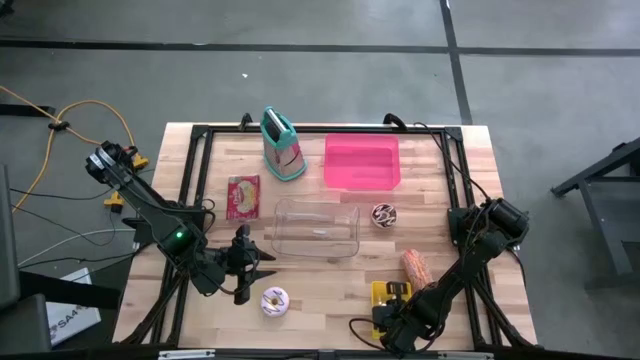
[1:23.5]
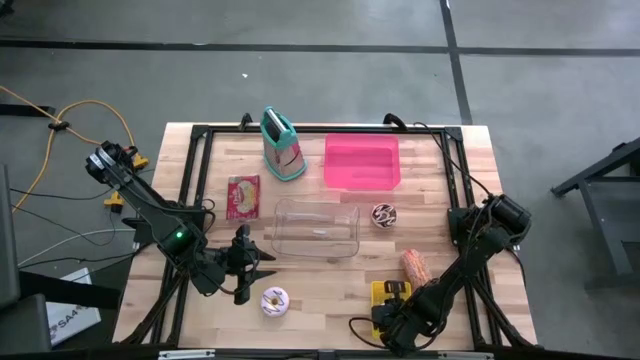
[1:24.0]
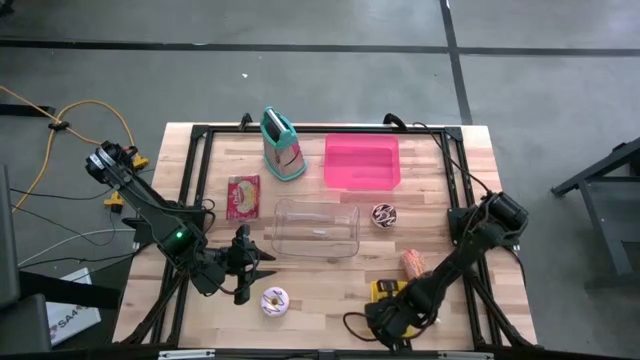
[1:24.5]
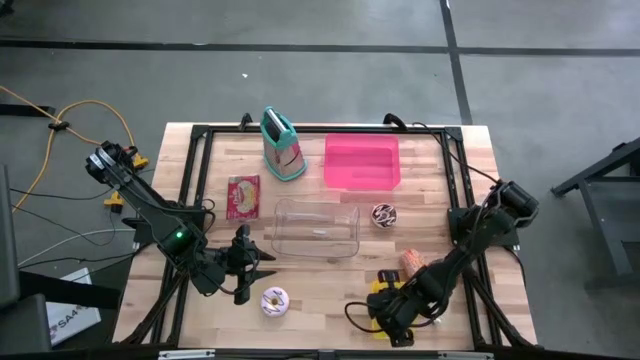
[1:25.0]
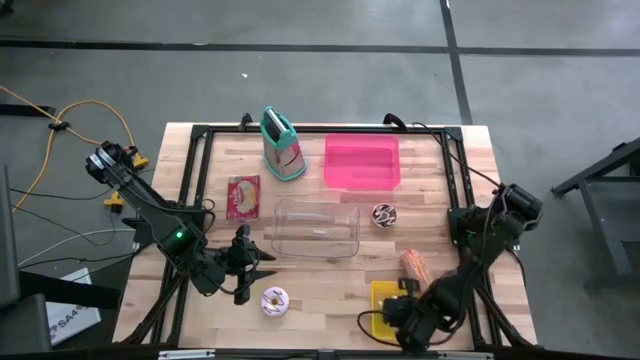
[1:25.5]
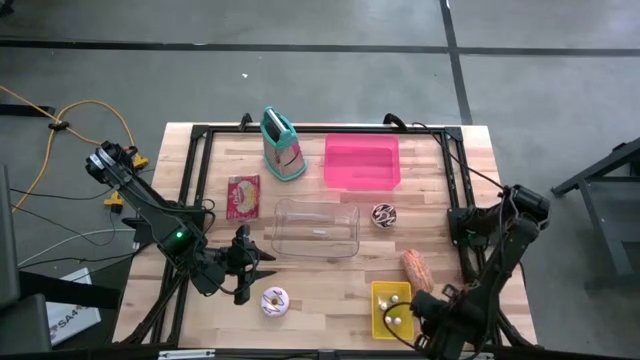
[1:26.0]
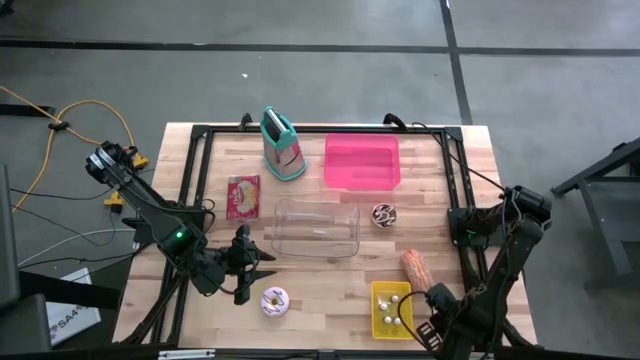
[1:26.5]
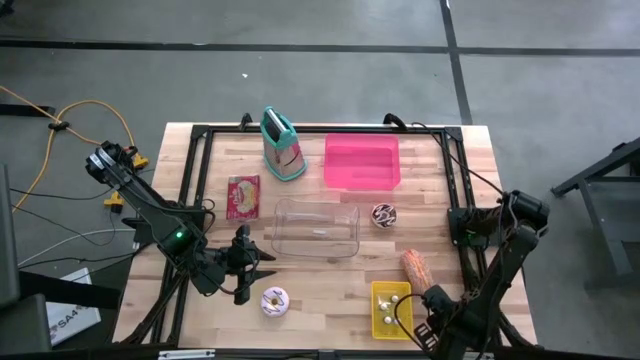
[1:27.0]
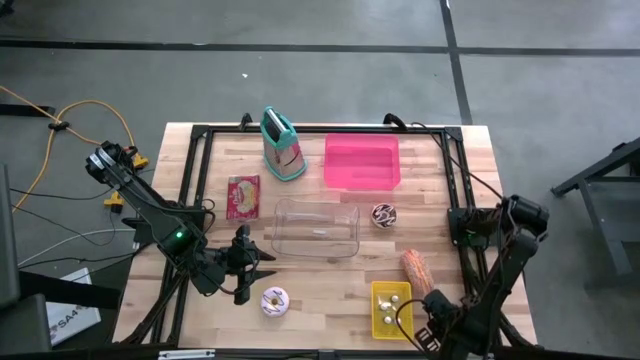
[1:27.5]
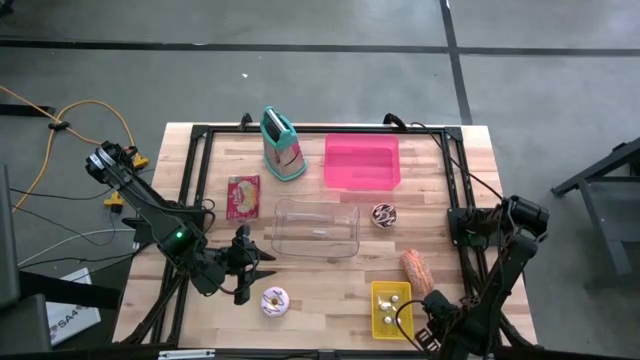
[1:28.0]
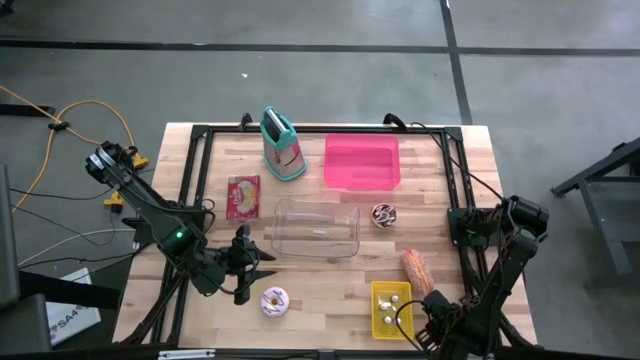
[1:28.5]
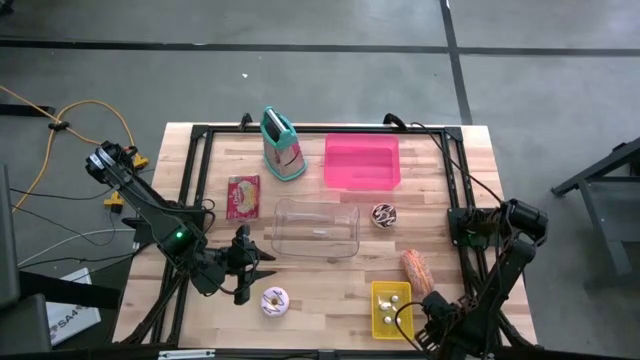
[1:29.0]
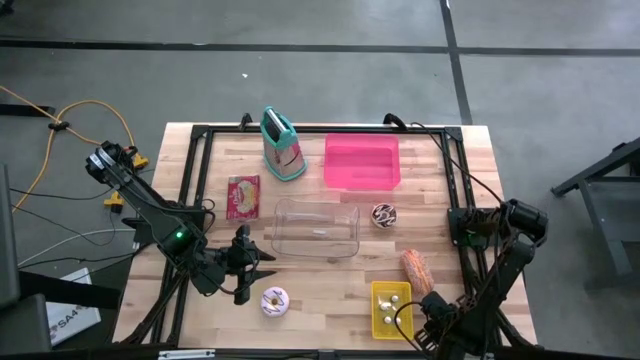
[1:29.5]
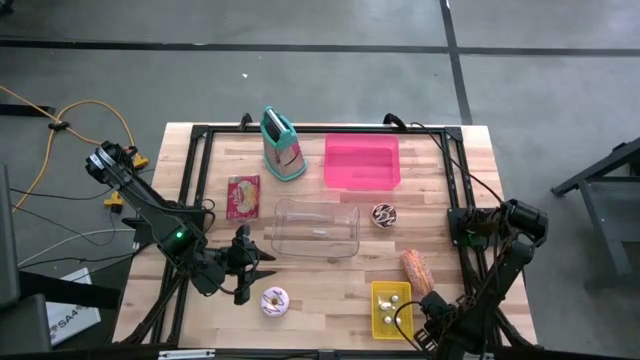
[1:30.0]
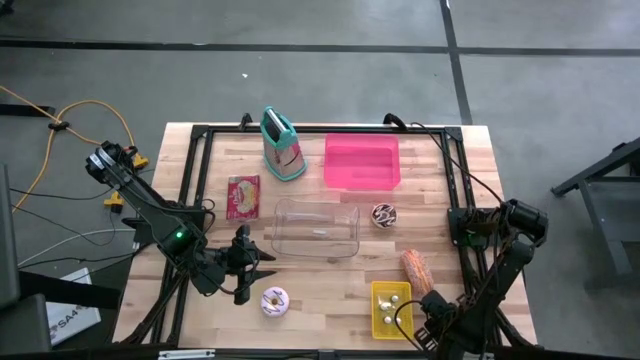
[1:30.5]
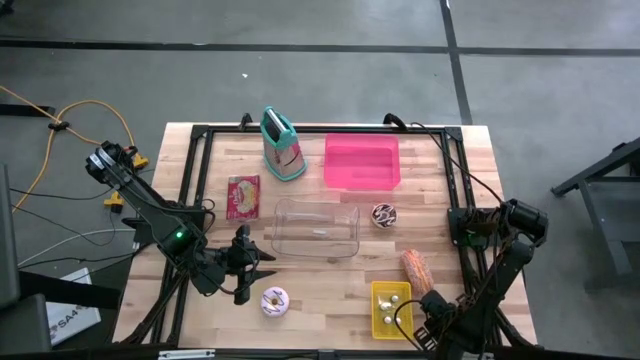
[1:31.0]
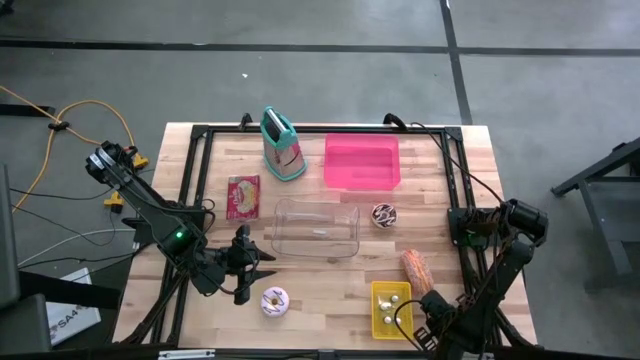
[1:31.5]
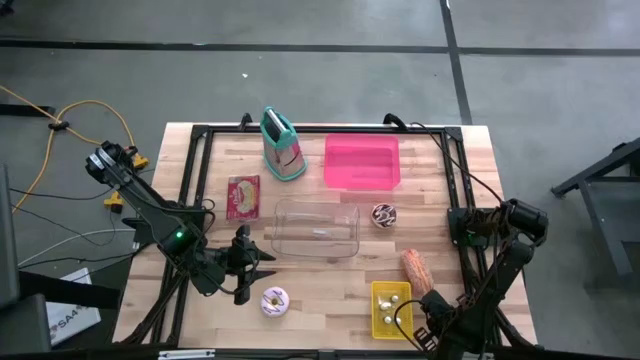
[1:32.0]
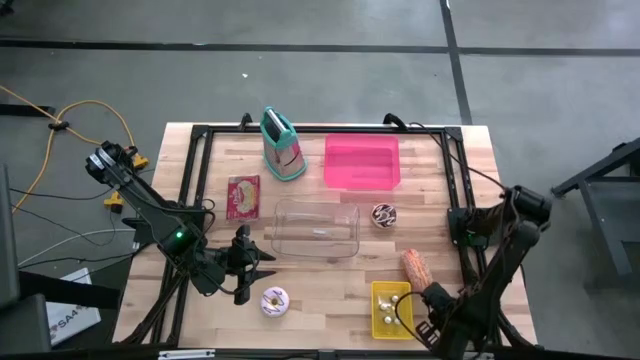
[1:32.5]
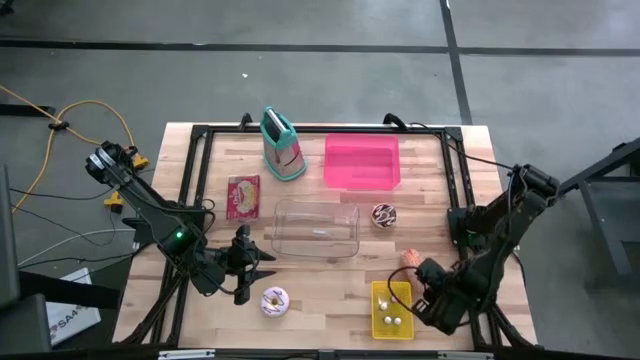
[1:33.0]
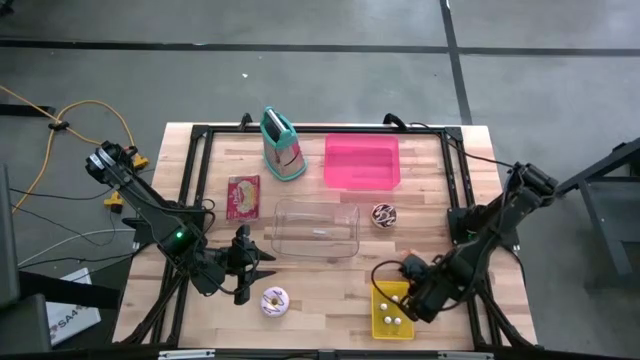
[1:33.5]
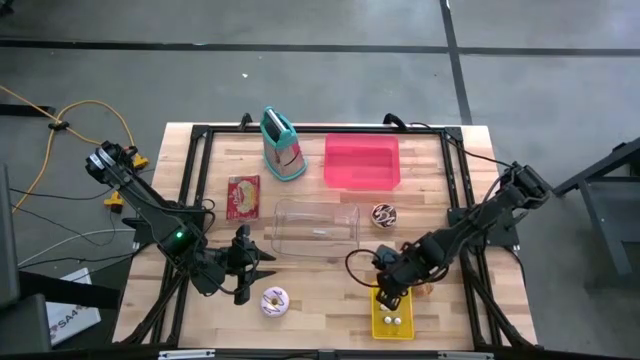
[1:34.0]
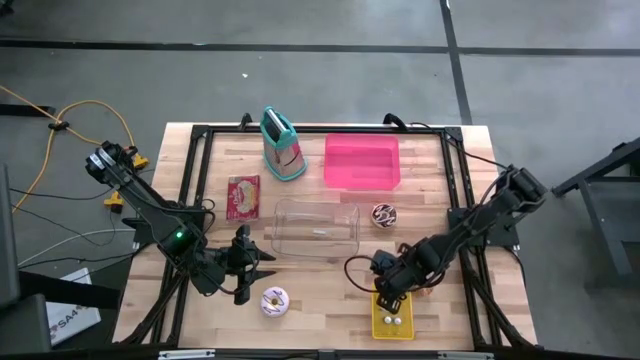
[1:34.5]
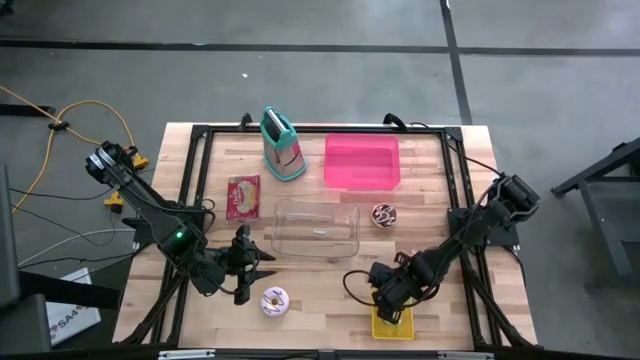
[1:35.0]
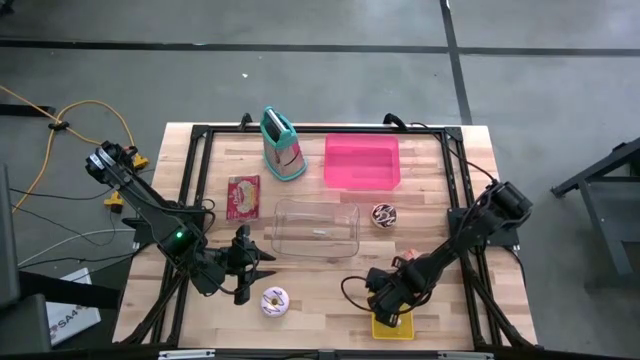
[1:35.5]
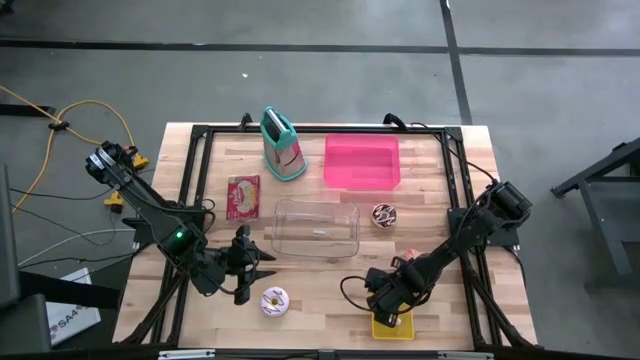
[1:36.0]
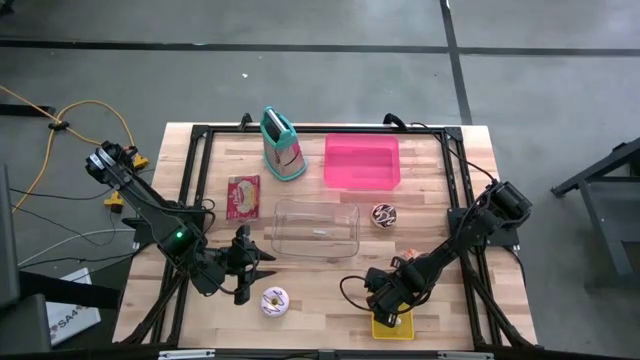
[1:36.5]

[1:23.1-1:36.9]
Put the black food coloring bottle into the yellow bin
